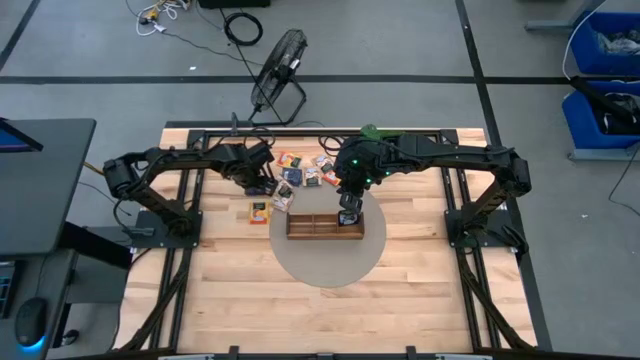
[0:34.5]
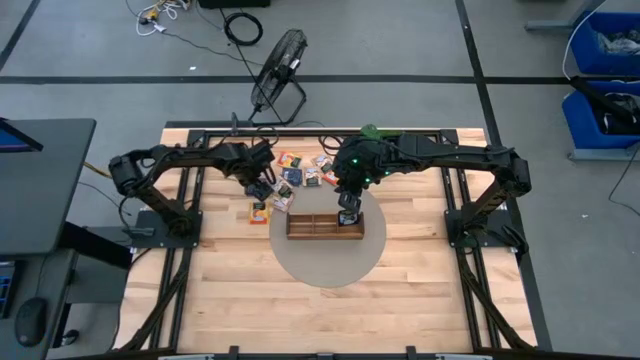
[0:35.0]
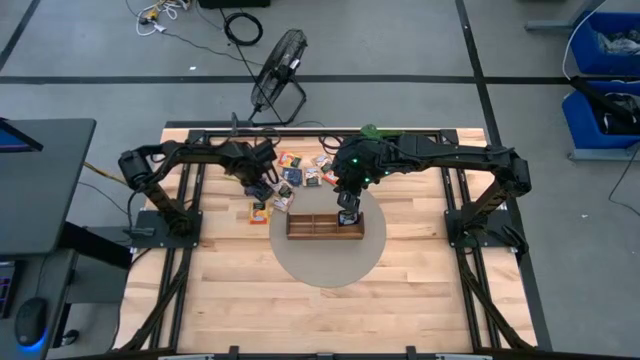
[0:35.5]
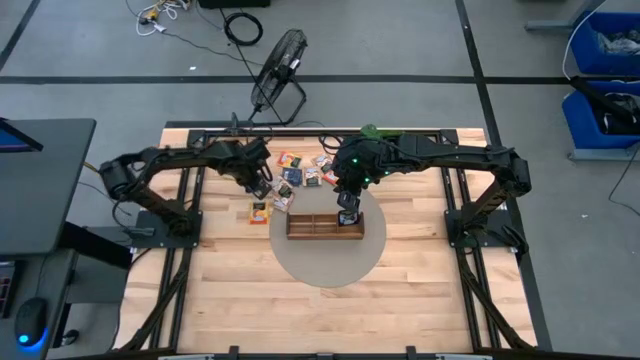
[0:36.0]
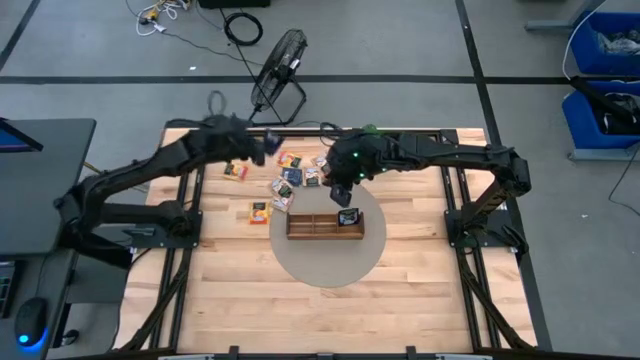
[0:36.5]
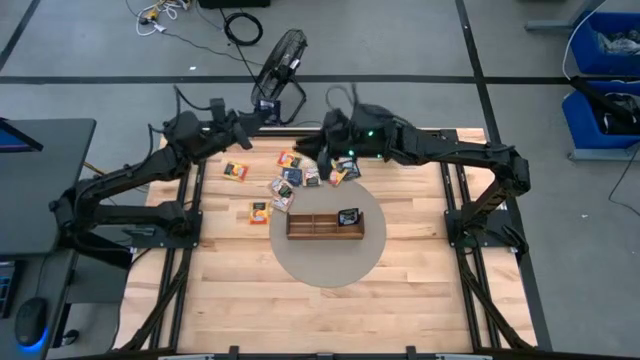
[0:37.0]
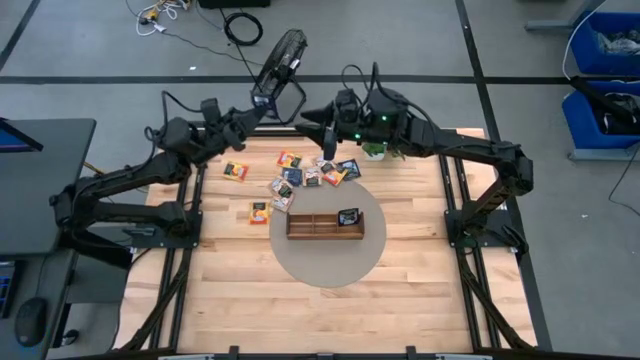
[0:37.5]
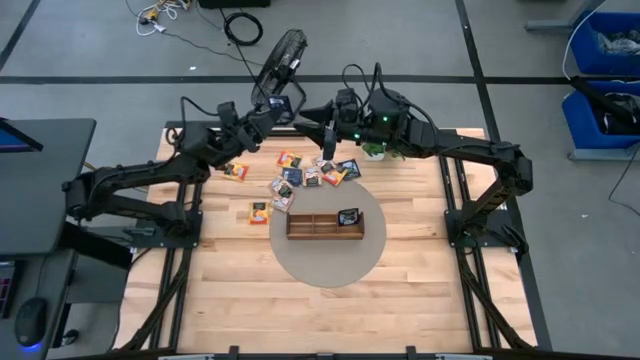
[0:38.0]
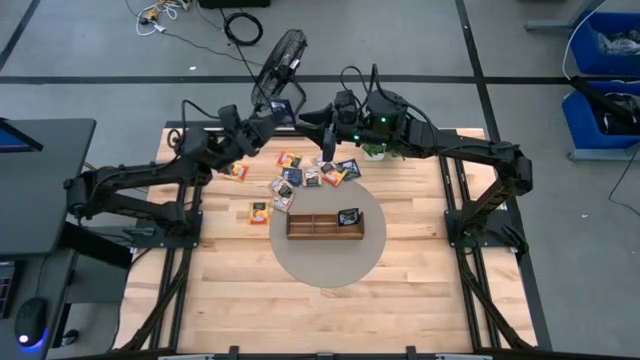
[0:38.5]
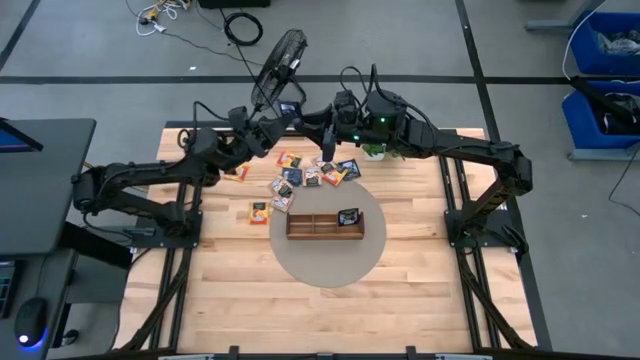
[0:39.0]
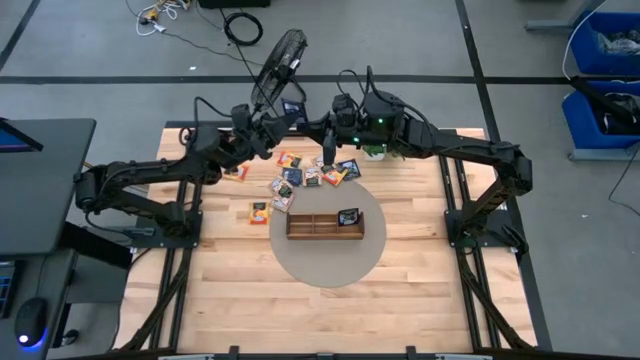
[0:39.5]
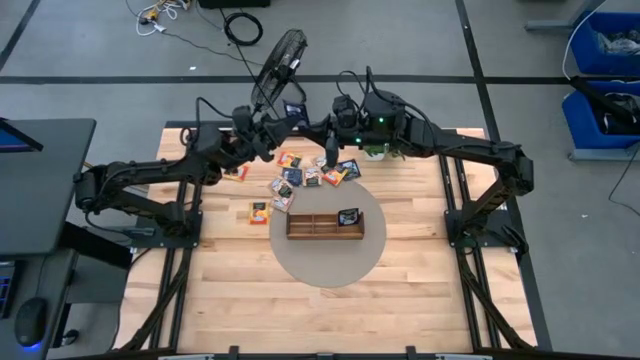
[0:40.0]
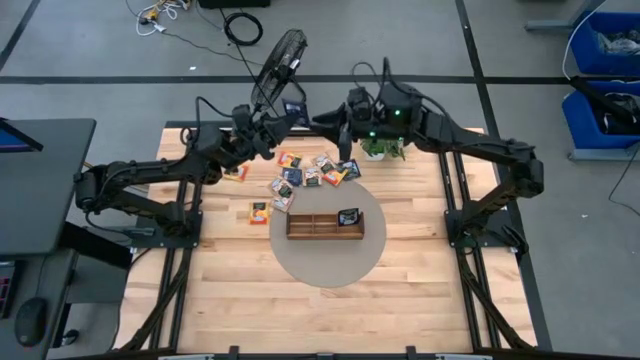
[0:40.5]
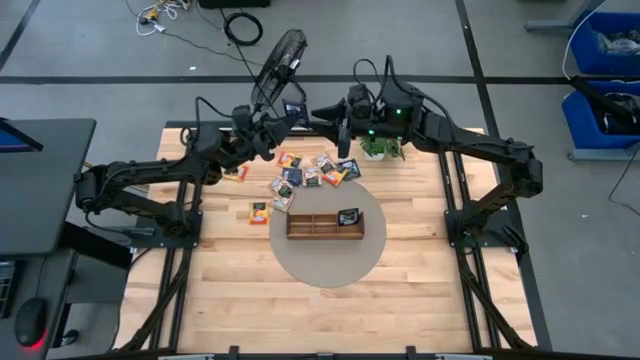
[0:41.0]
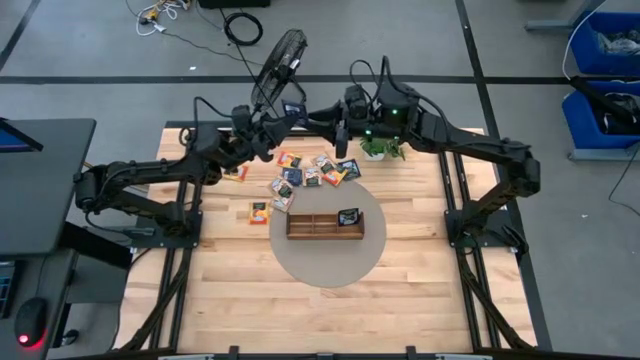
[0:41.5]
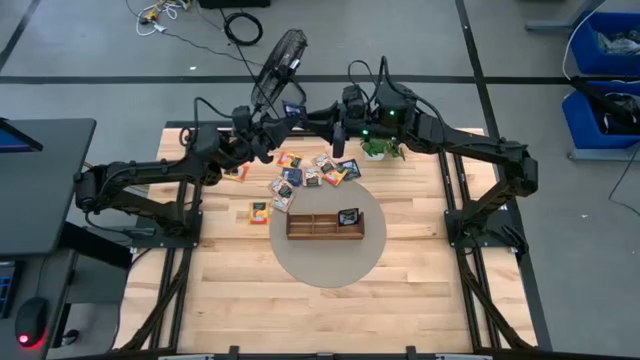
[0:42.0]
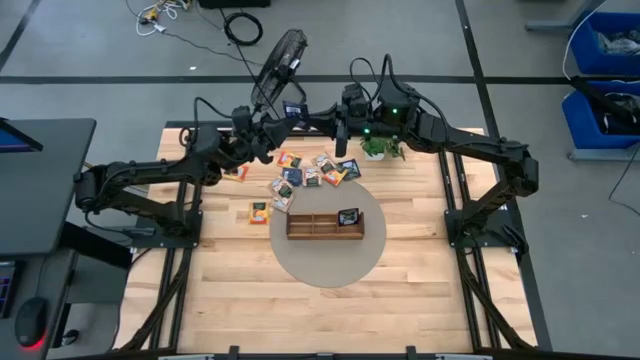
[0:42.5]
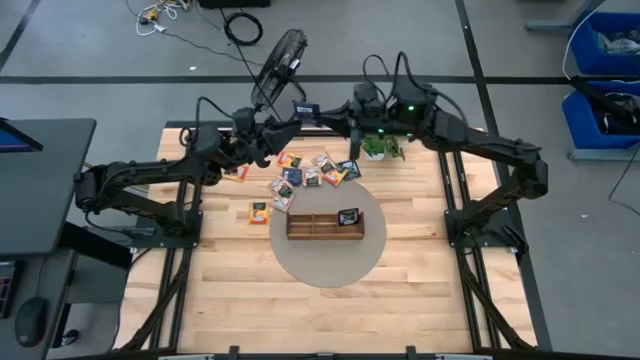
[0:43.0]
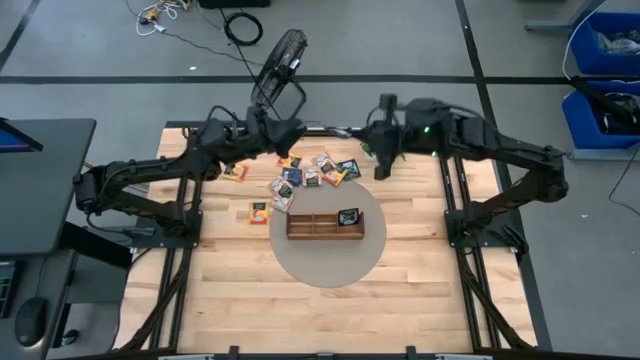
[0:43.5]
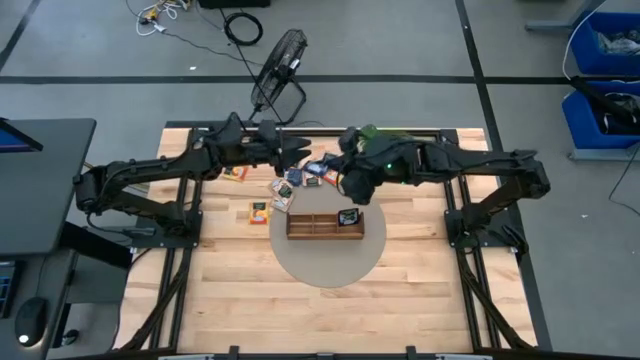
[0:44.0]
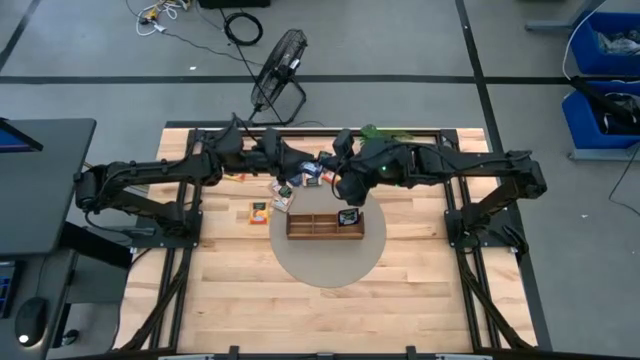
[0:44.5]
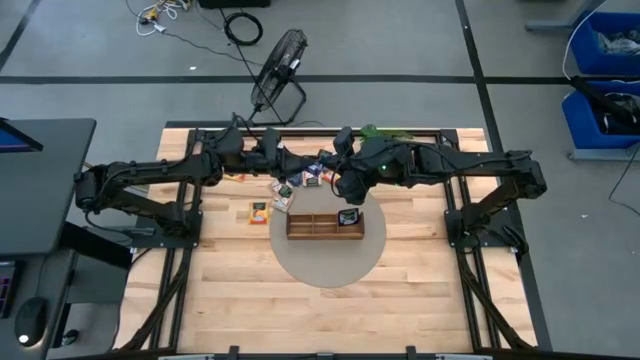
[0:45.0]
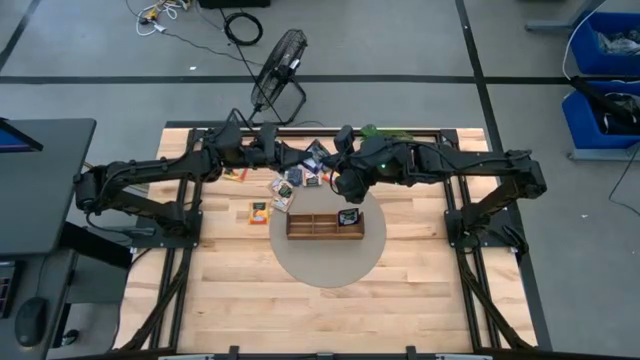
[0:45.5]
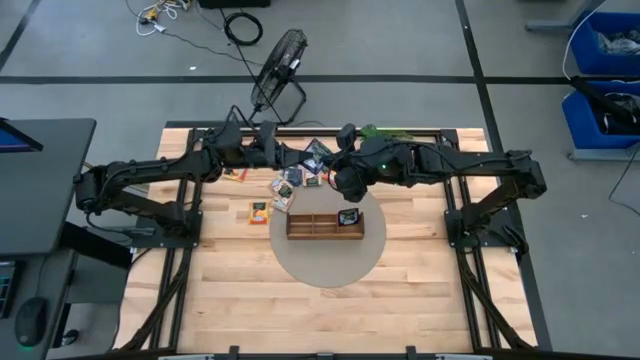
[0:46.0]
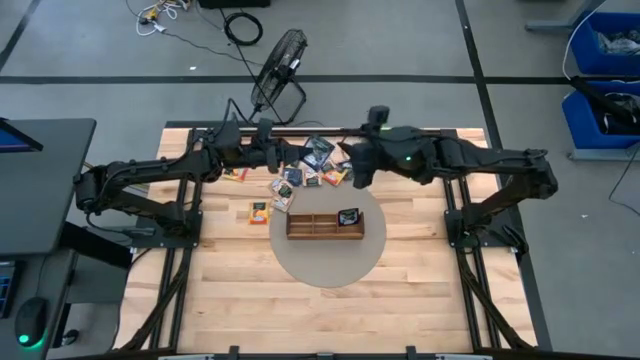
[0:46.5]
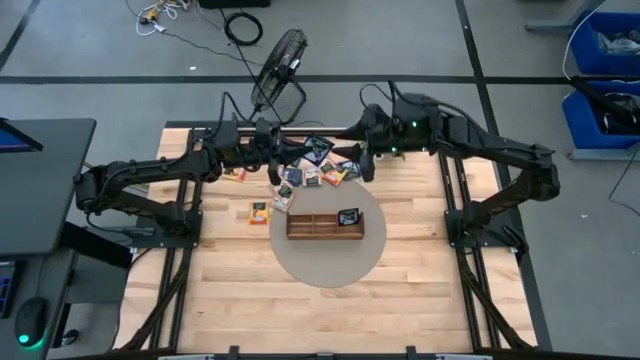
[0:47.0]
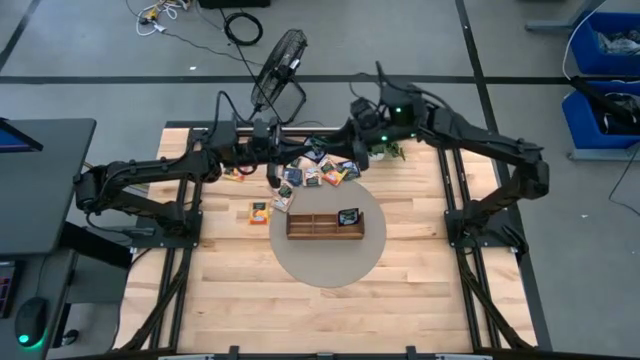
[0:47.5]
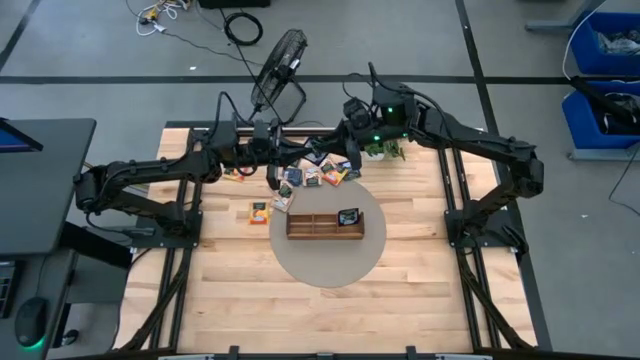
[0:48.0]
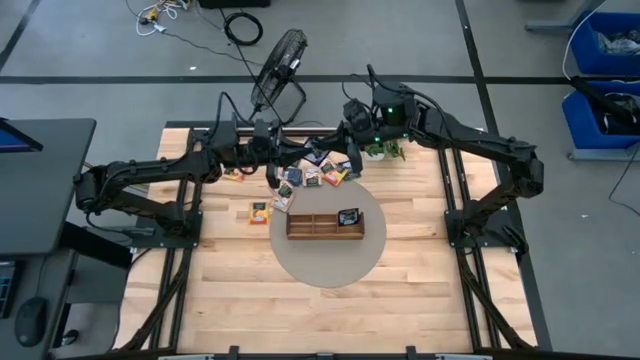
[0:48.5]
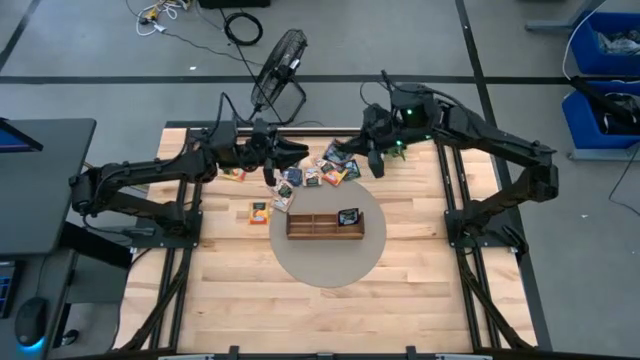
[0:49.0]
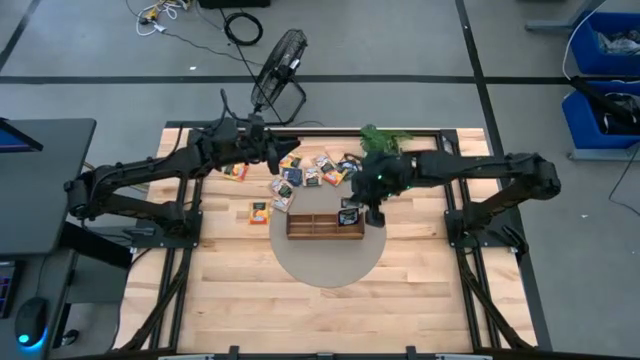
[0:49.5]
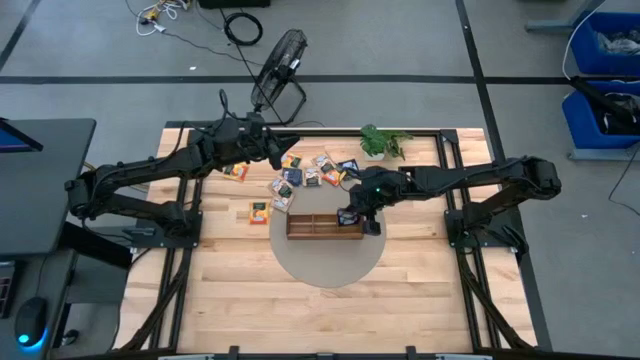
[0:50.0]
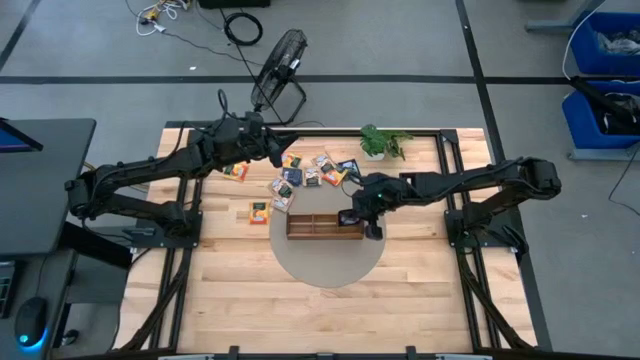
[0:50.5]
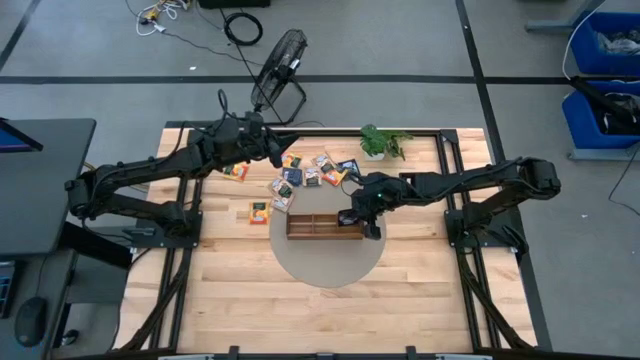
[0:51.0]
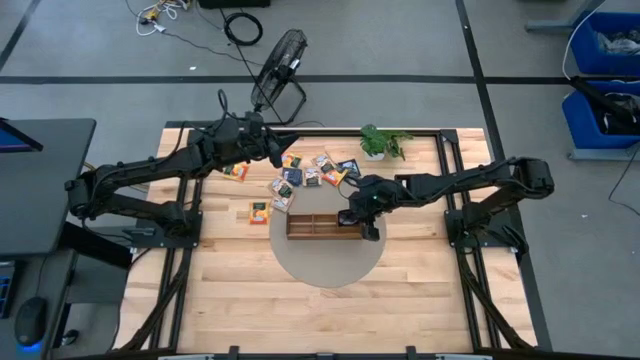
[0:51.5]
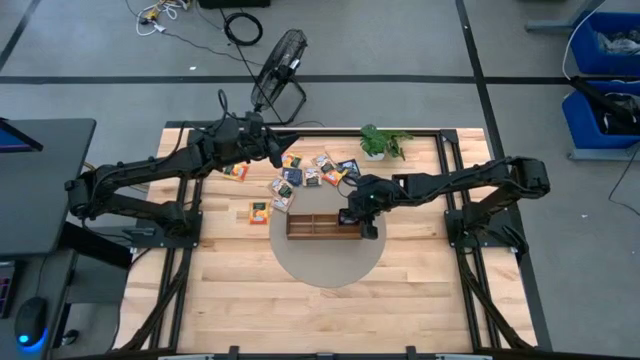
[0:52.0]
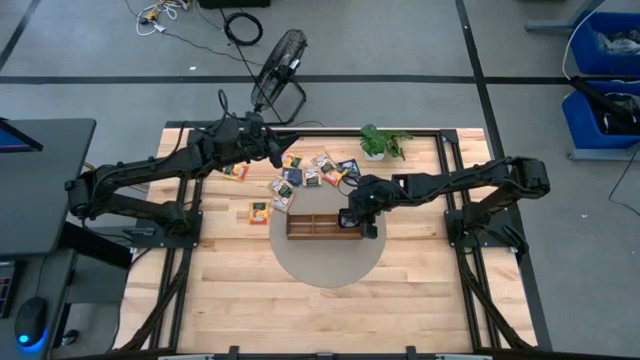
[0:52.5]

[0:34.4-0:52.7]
Task: Pick & Place Tea
Put the blue tea bag into the right section of the wooden organizer

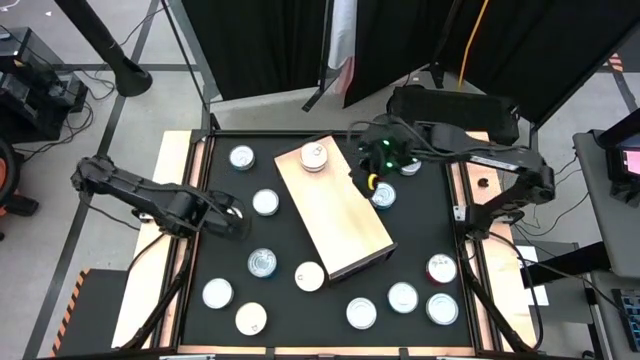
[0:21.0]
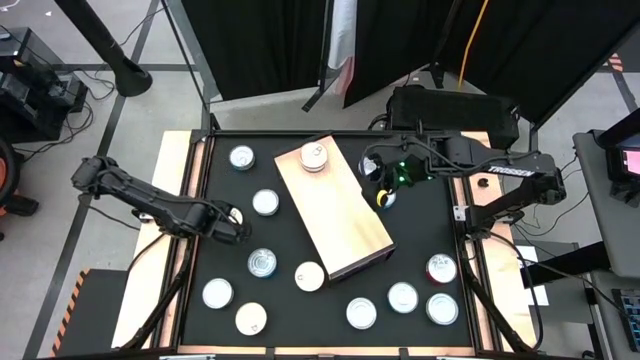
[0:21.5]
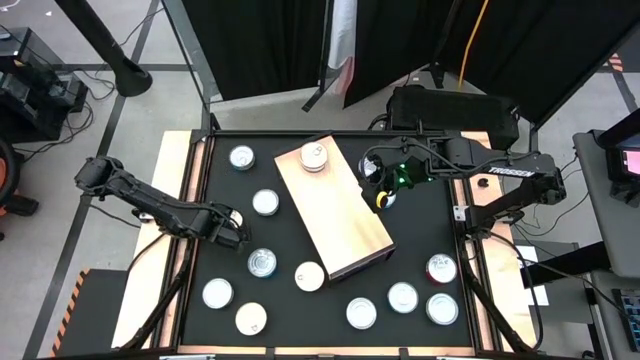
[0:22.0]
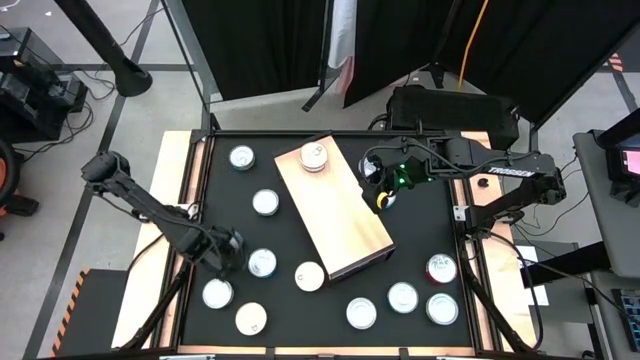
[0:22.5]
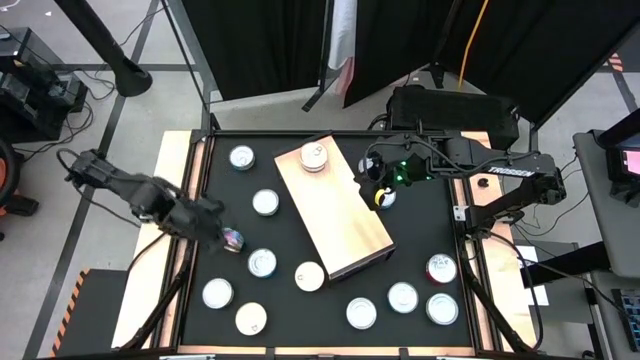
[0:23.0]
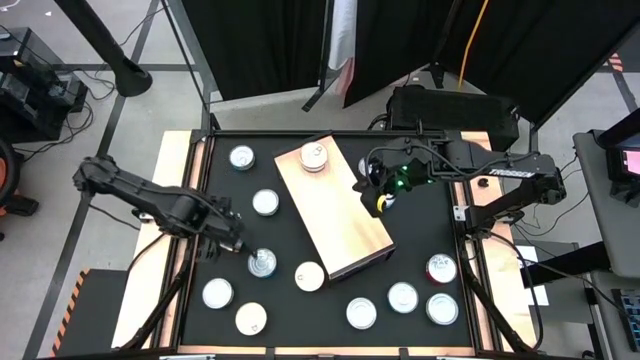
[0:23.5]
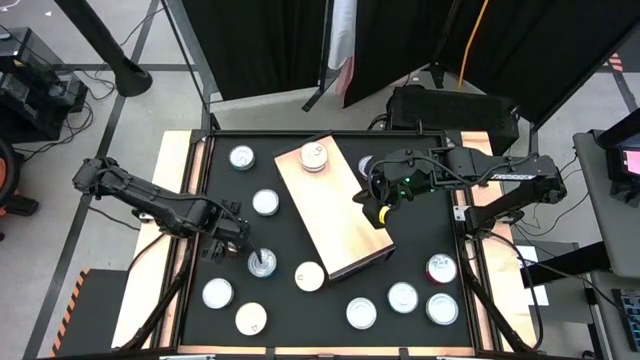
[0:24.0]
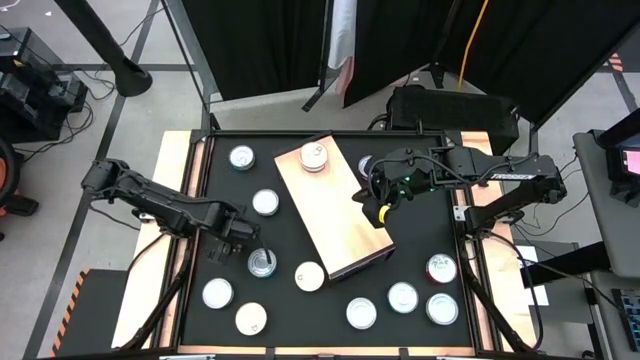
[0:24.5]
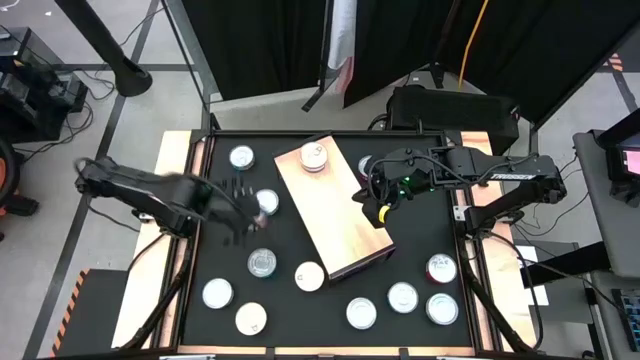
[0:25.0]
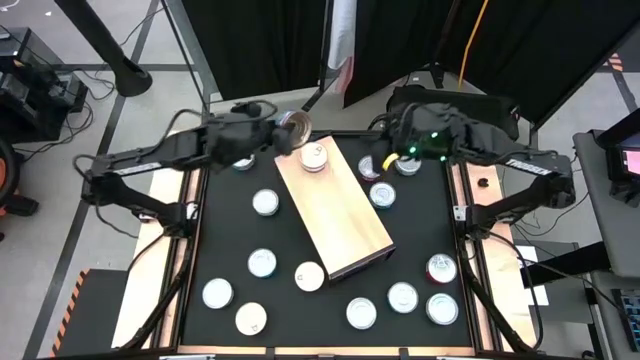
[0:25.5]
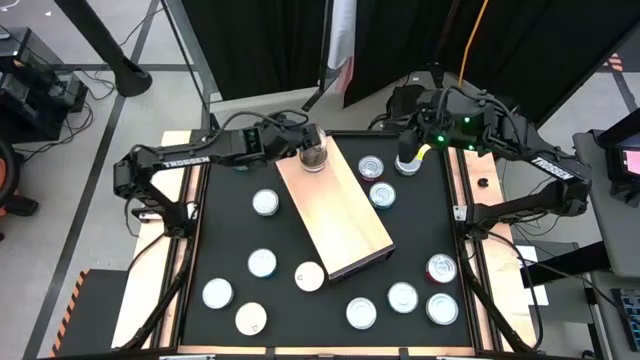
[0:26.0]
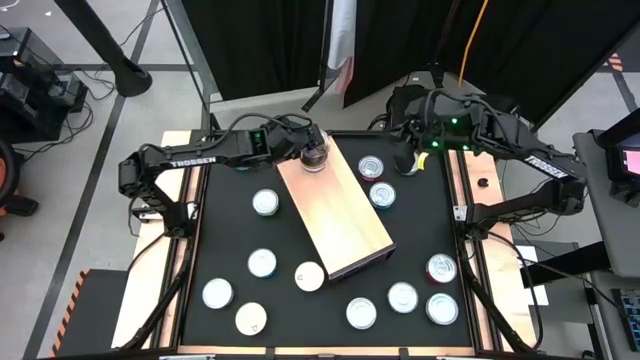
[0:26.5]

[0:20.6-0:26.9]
Task: Stack canned seafood by type on shelf
Stack the blue-pink tuna can on top of the blue-pink tuna can on the shelf
